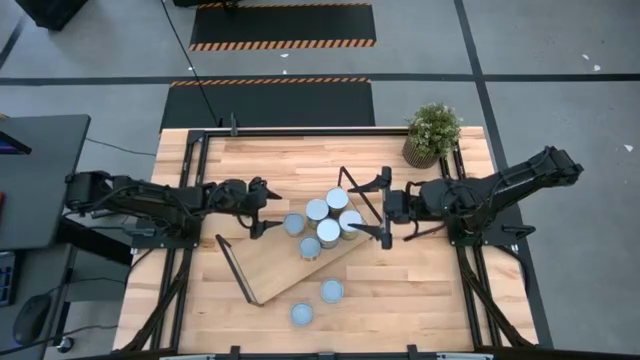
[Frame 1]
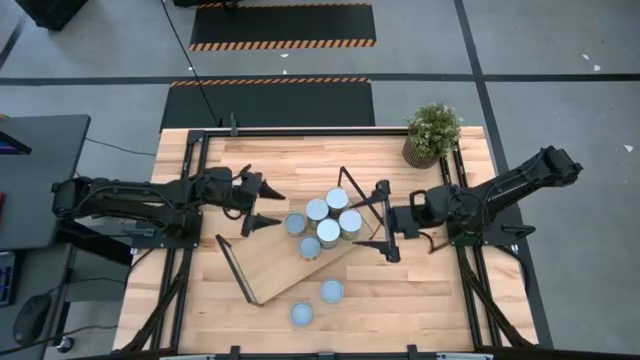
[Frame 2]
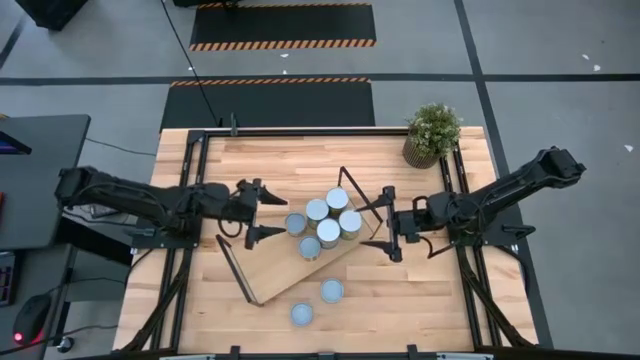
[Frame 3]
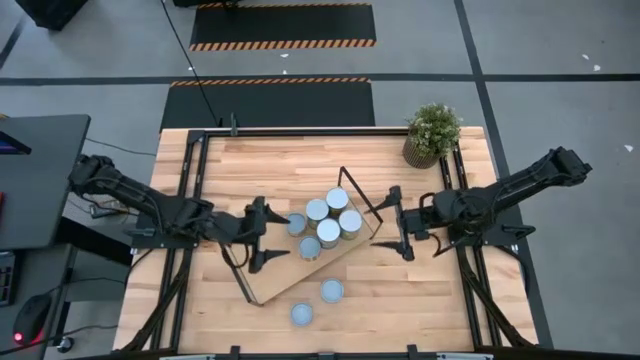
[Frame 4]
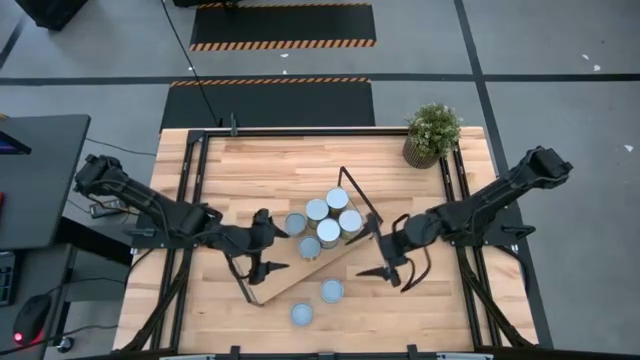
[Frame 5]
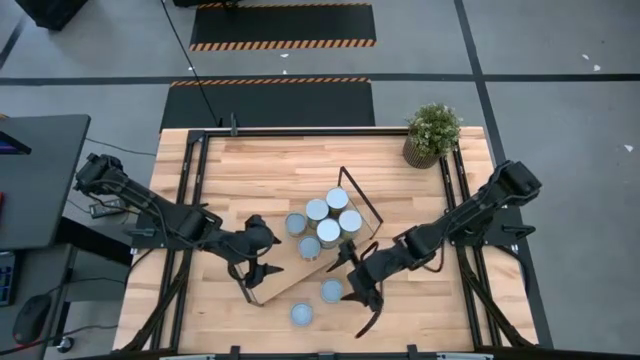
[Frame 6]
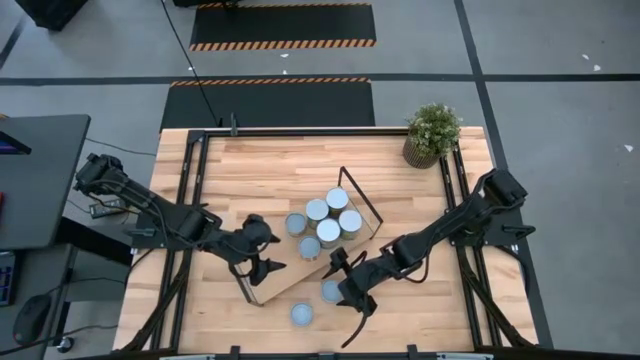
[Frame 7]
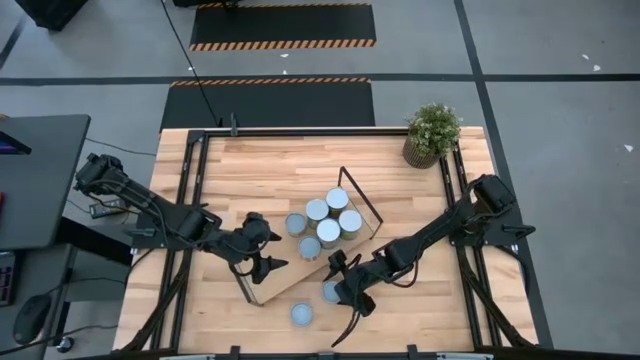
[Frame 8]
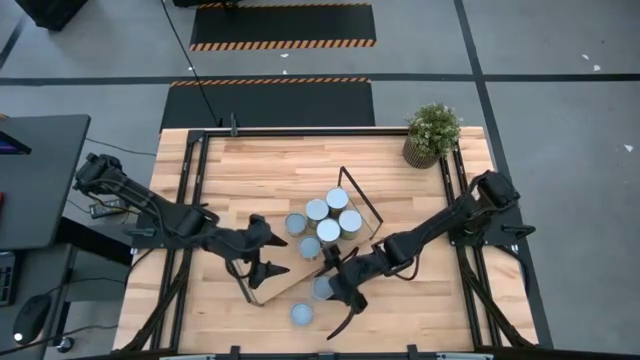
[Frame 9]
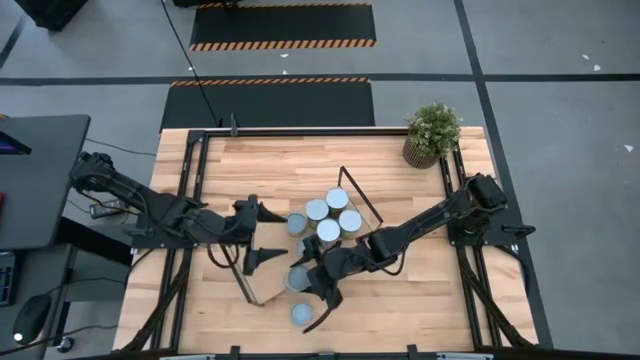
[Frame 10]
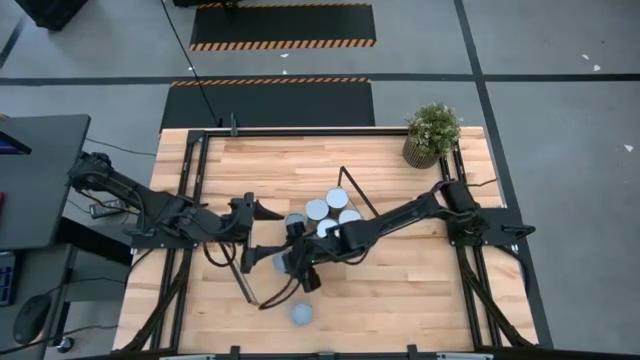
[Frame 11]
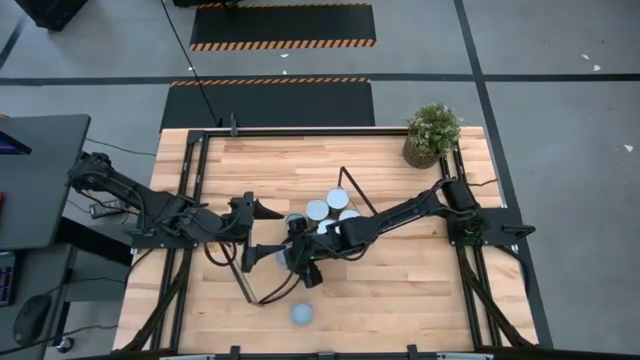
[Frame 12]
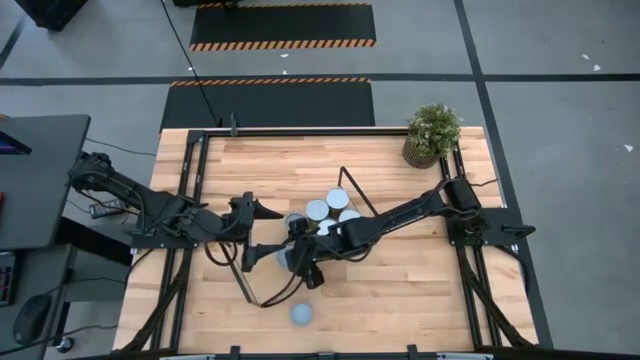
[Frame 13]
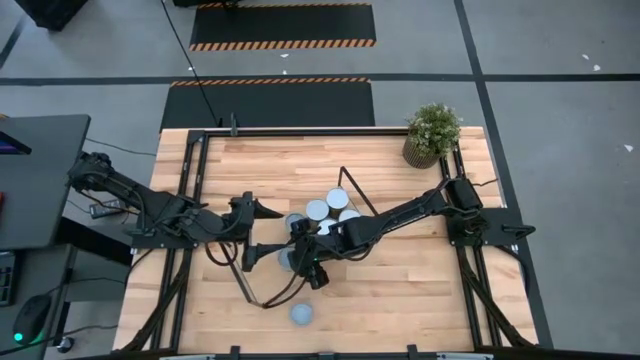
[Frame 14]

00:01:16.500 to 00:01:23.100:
Task: Pick and place cans onto a shelf
Put the canned mixed vegetables on the shelf

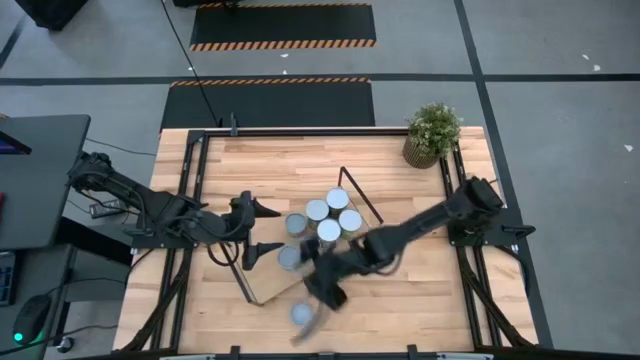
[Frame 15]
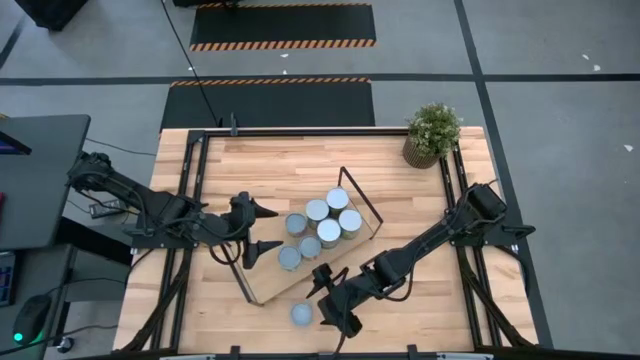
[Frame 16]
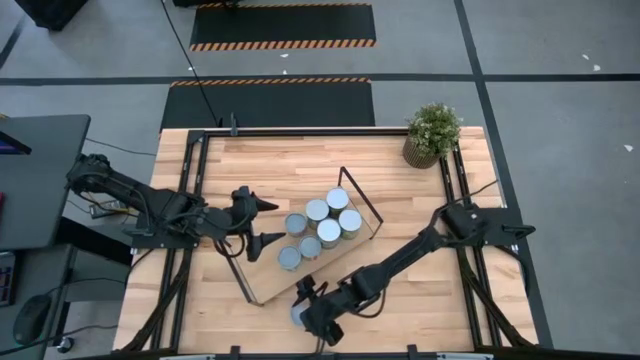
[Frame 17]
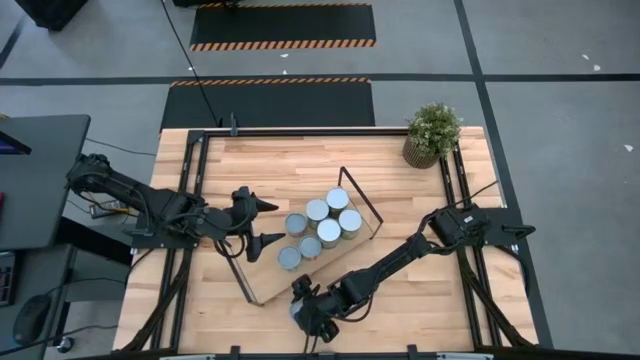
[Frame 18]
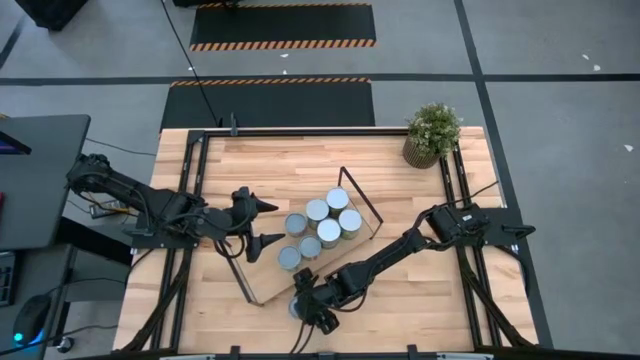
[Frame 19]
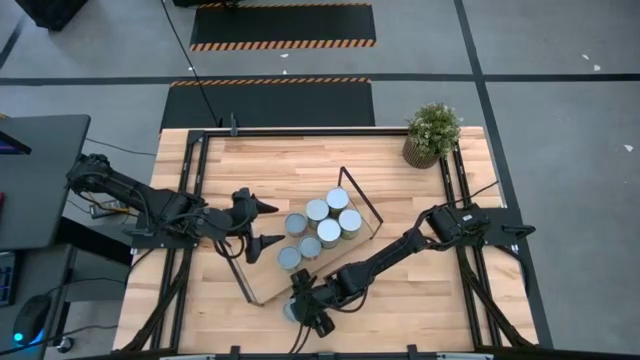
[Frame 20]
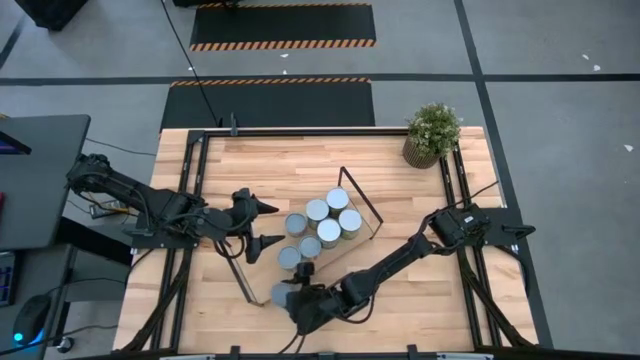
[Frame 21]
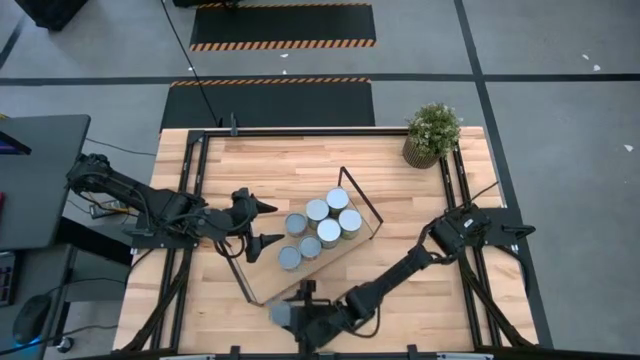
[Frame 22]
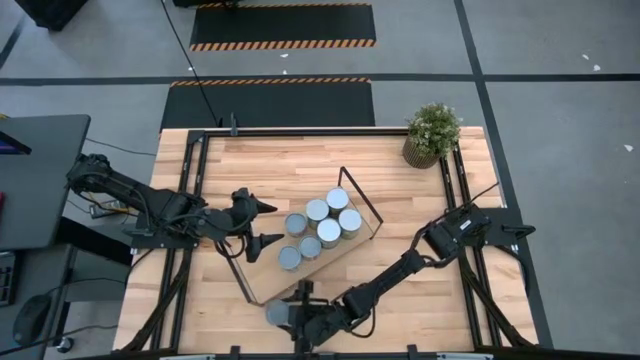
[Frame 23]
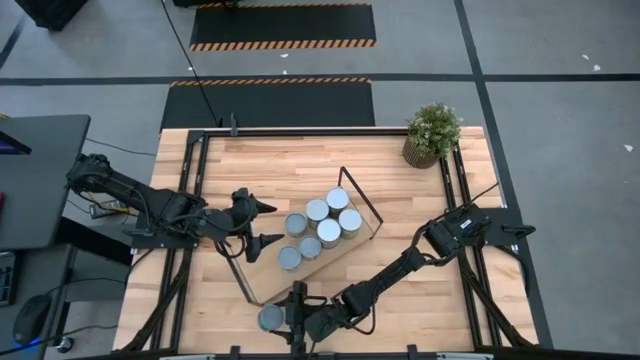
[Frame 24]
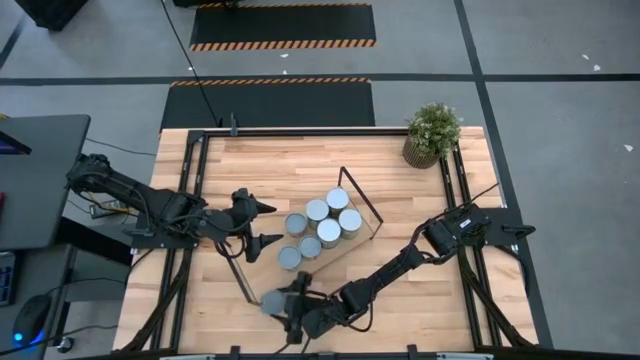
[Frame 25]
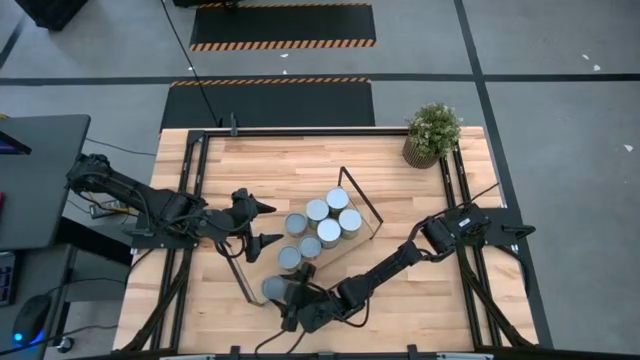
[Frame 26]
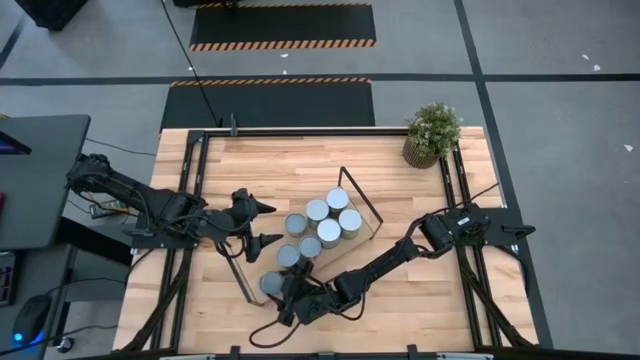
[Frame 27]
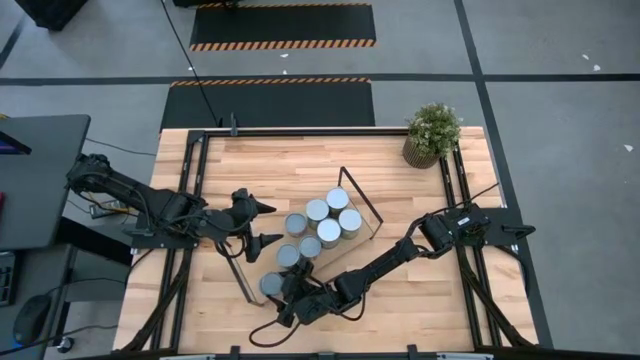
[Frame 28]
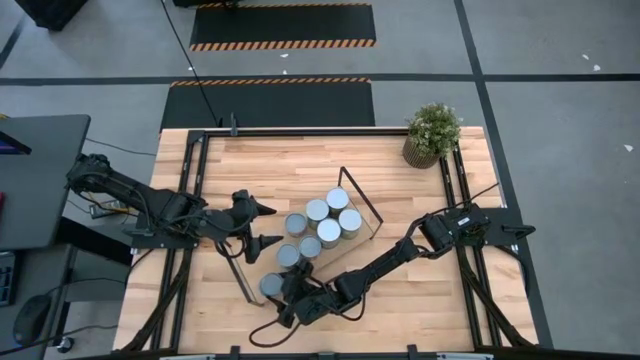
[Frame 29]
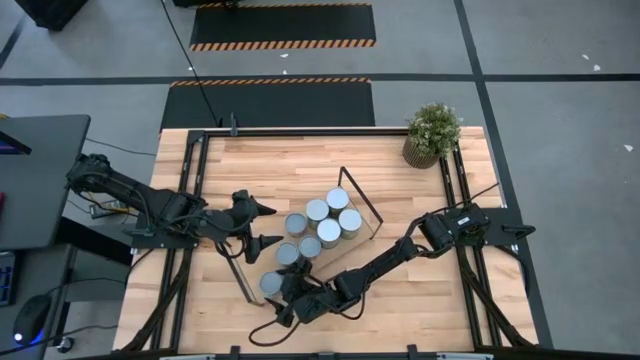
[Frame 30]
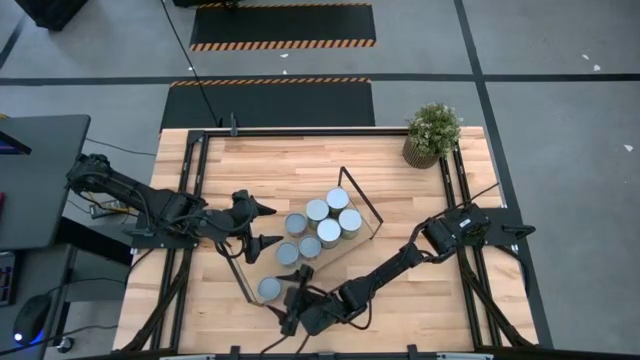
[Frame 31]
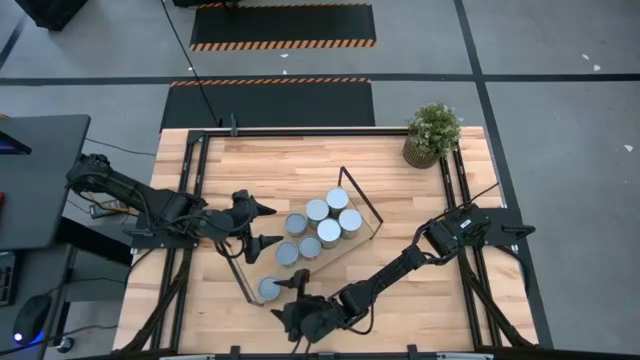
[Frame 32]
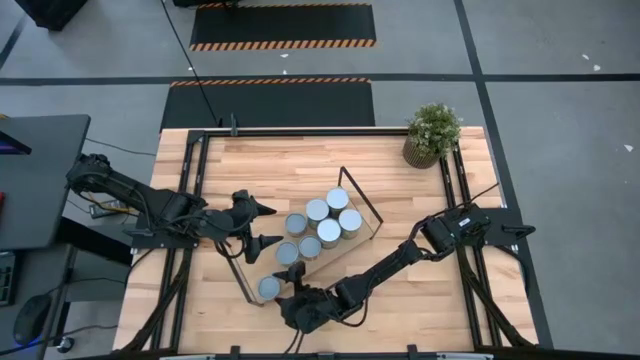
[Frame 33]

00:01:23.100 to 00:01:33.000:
Put the canned tuna on the shelf
